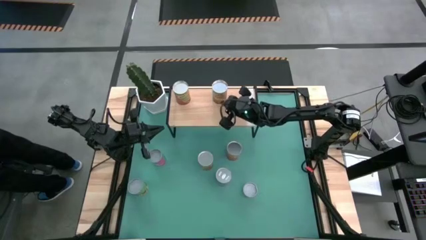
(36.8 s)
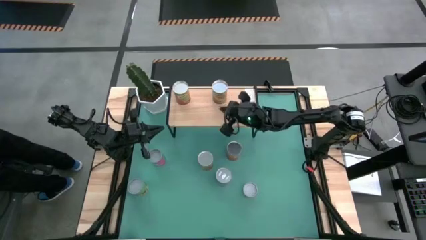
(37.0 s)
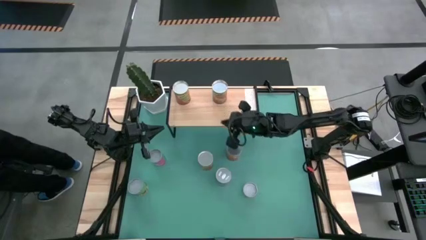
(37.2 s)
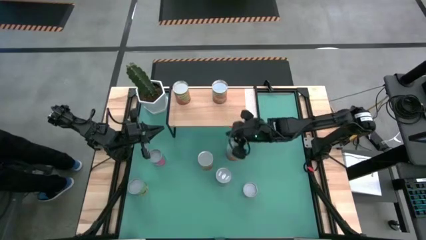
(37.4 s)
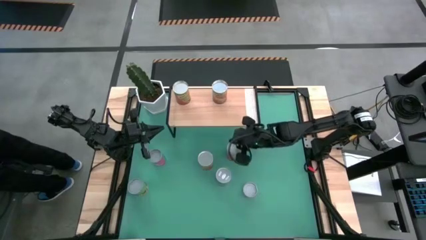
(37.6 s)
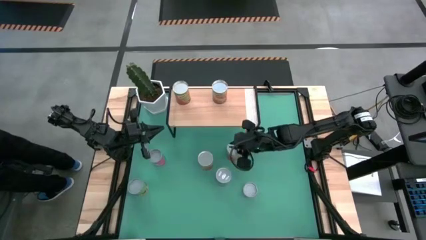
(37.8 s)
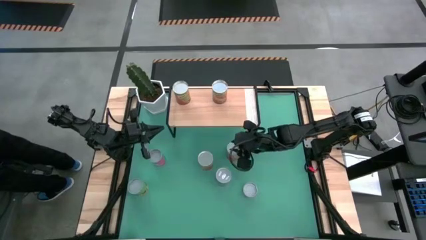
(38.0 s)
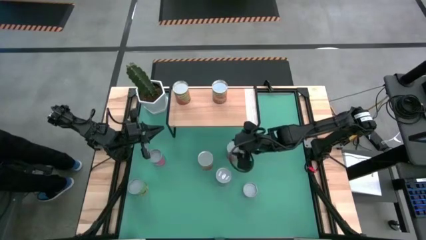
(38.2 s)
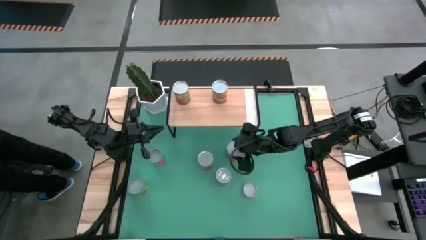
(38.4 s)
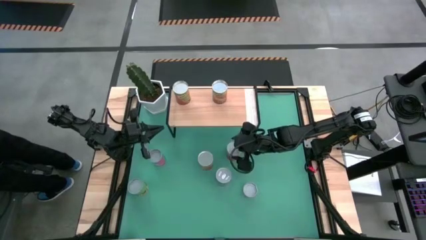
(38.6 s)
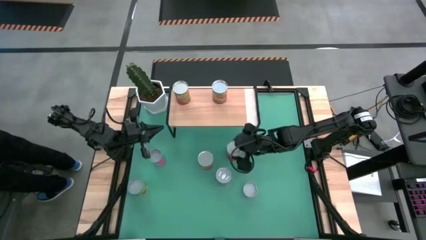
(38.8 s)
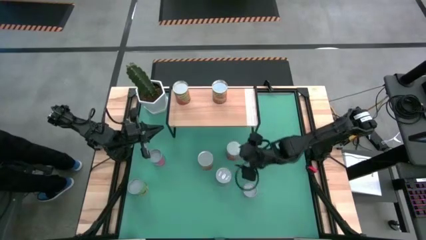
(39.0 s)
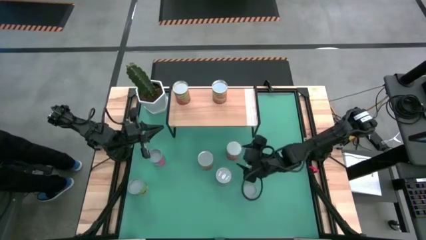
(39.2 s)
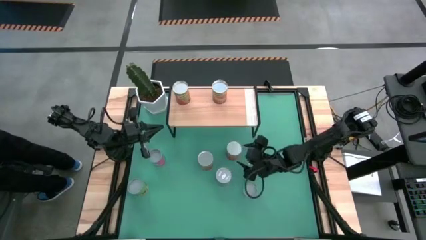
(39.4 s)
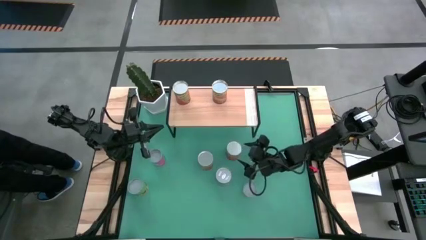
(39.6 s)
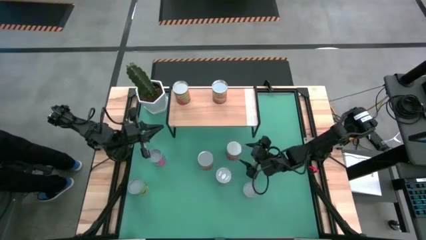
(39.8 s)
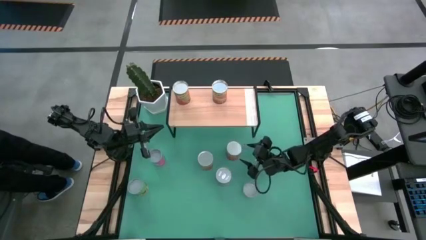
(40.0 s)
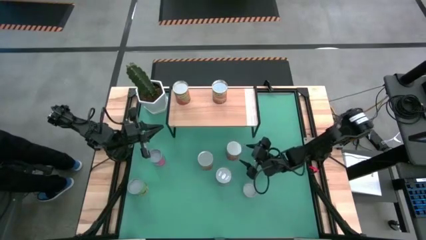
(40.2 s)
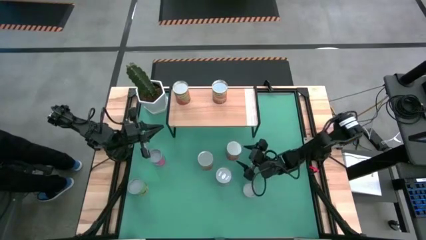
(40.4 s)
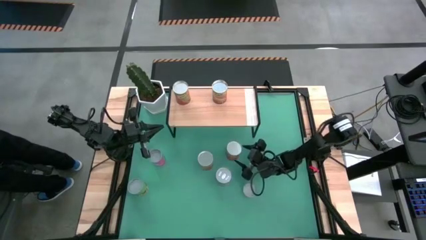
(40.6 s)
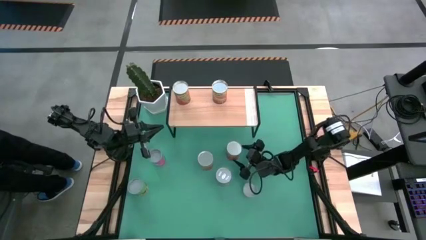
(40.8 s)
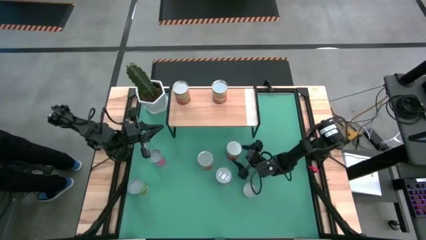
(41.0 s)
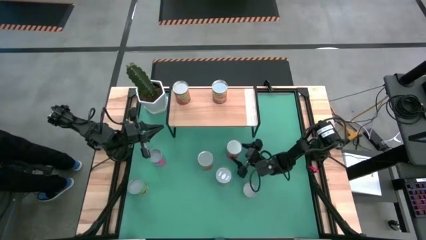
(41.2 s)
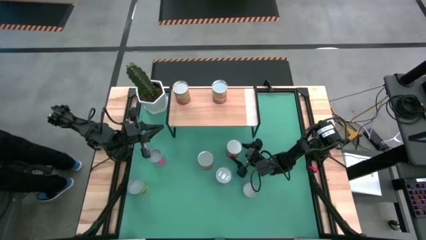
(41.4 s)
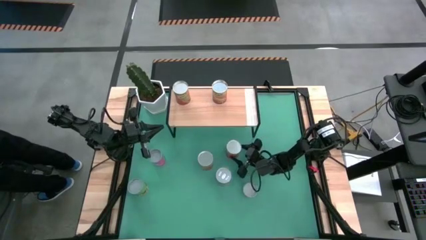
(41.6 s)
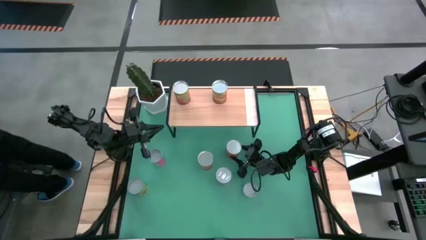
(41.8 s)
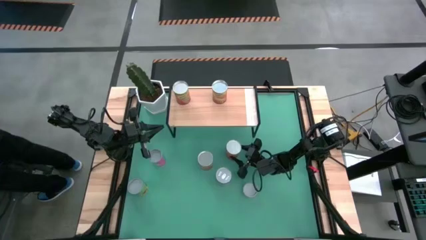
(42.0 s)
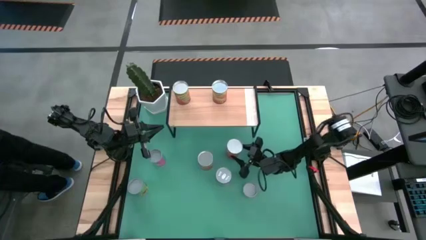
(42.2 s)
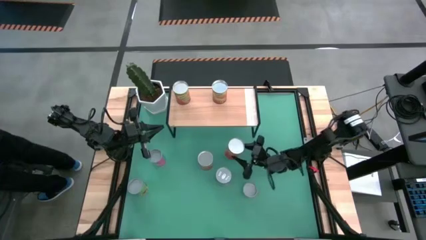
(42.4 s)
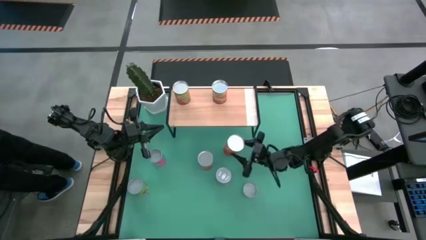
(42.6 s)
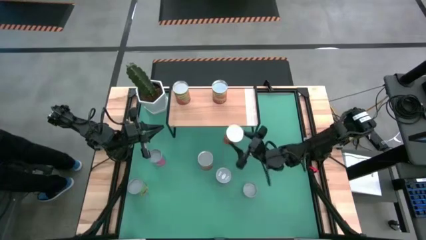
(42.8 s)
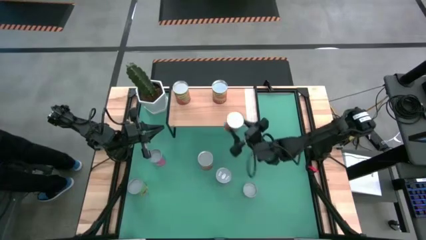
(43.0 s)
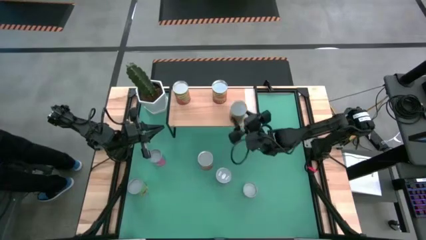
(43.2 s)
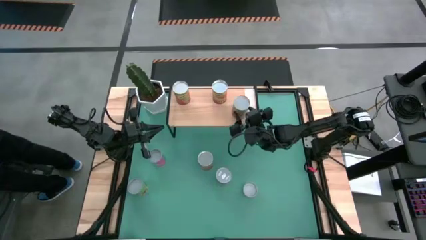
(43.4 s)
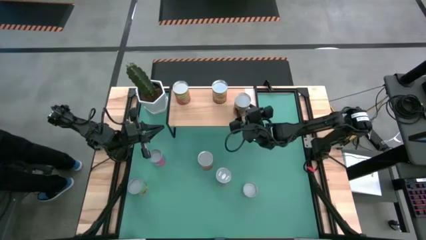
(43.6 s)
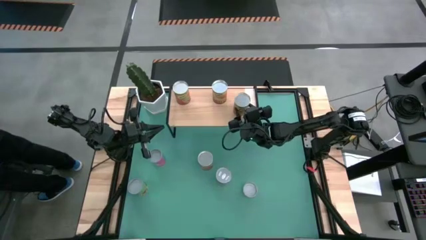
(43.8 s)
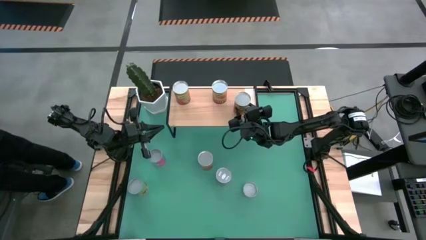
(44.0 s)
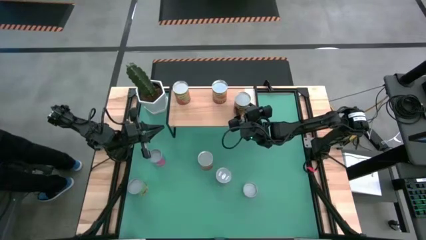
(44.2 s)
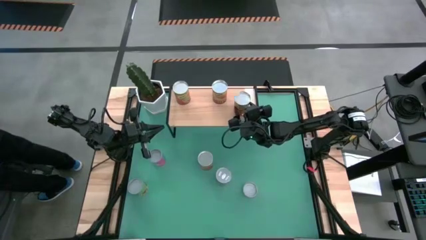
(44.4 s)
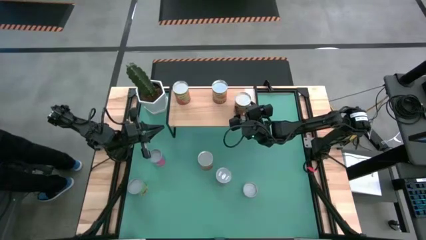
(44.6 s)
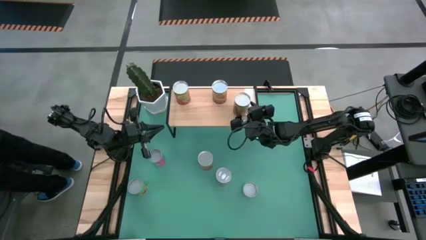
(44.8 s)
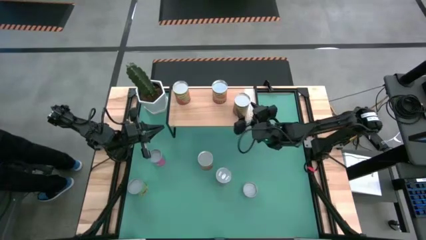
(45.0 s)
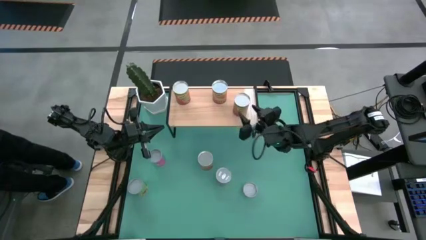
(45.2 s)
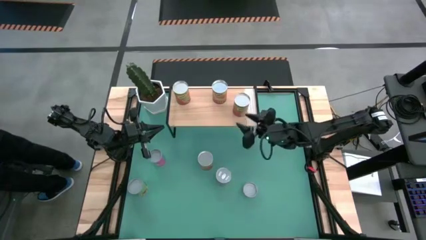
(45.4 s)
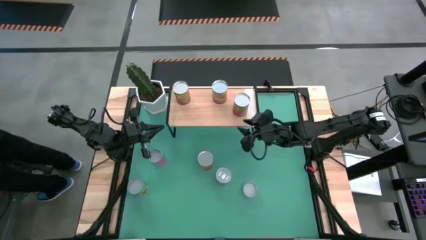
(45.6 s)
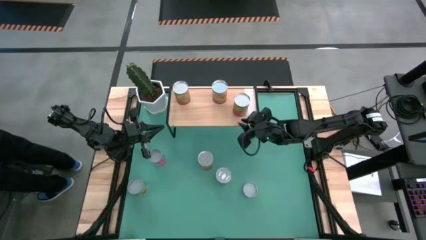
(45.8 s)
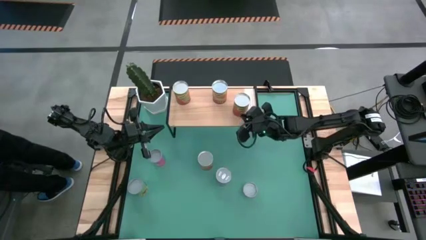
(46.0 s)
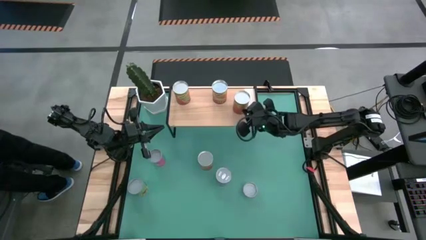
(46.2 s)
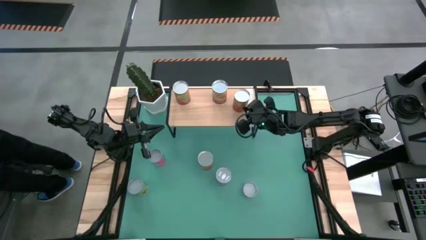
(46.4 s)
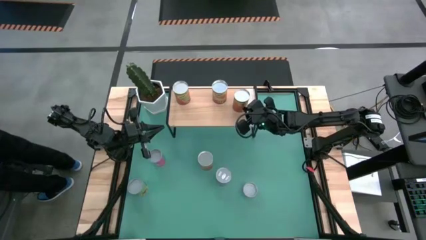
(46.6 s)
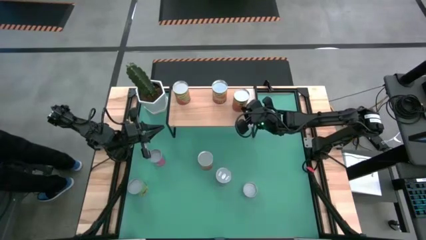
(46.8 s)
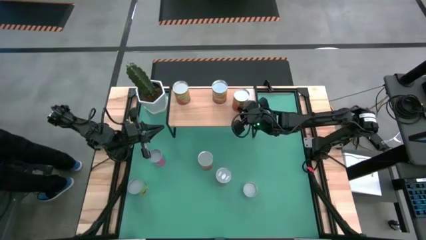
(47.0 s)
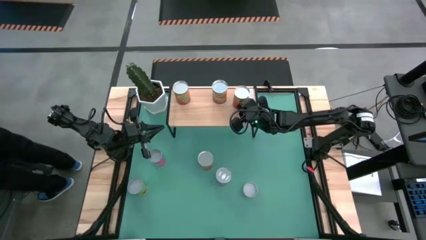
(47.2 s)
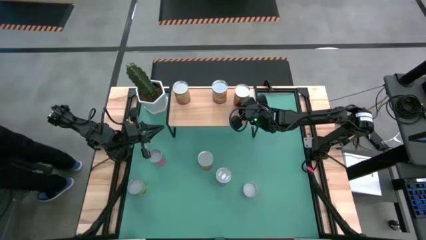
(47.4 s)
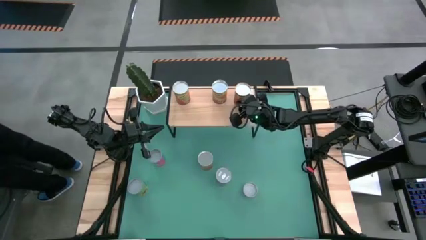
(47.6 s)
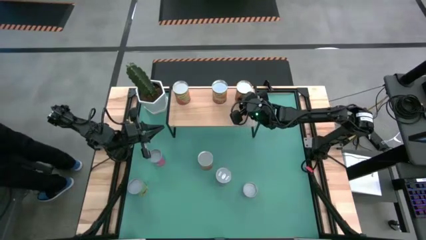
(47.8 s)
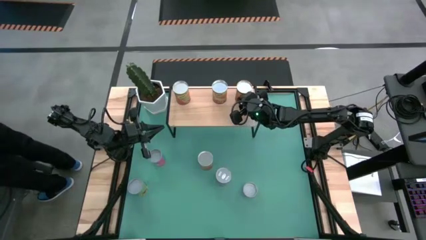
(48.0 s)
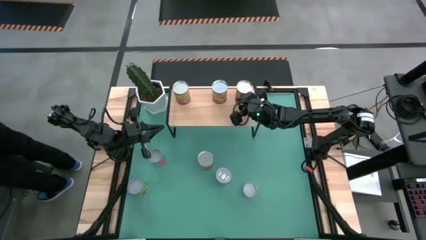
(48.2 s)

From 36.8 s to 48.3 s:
Task: Pick and place cans onto a shelf
Put the canned pineapple on the shelf

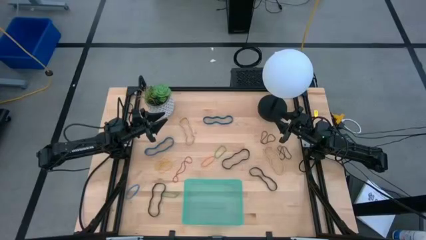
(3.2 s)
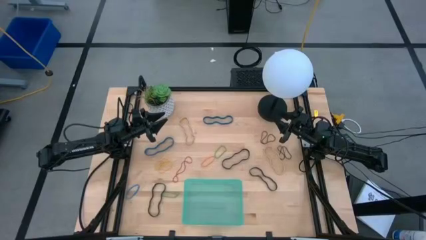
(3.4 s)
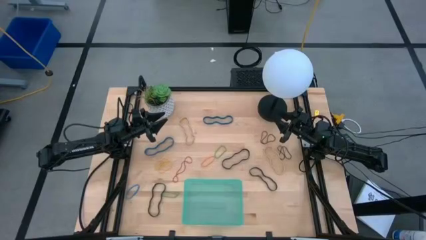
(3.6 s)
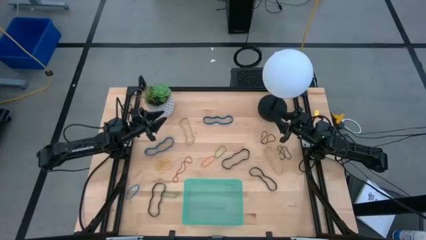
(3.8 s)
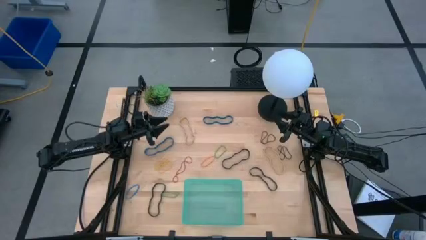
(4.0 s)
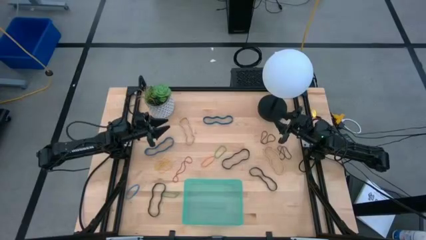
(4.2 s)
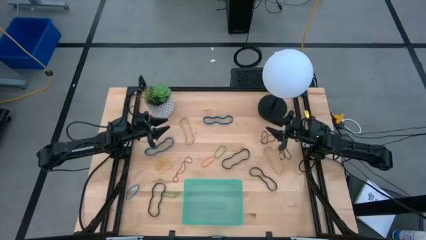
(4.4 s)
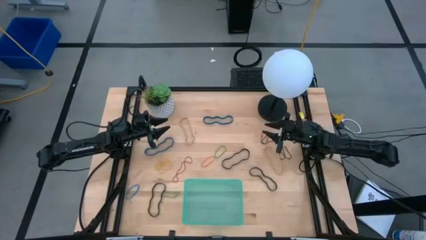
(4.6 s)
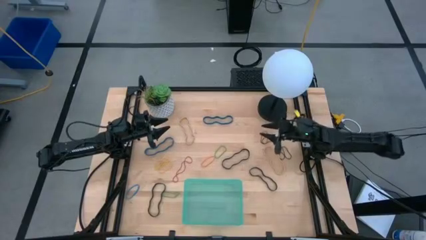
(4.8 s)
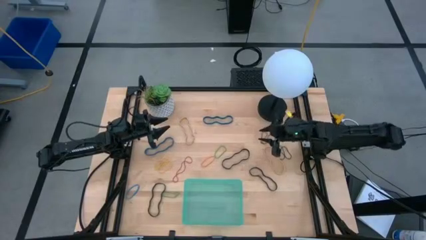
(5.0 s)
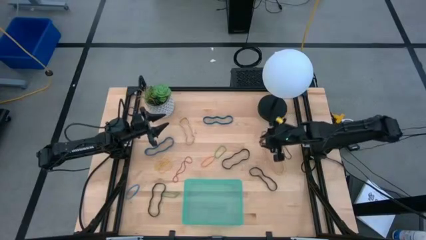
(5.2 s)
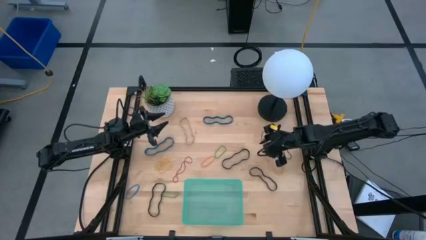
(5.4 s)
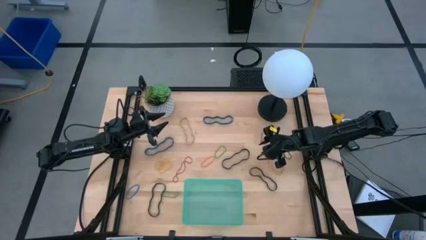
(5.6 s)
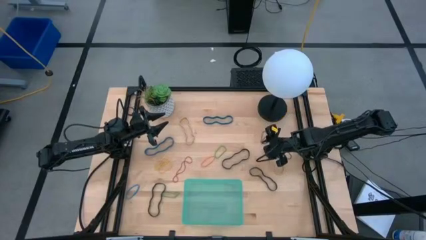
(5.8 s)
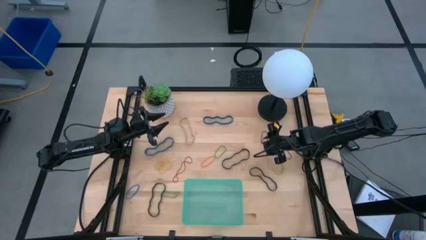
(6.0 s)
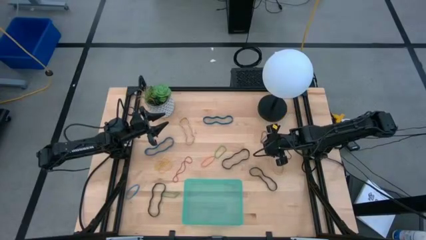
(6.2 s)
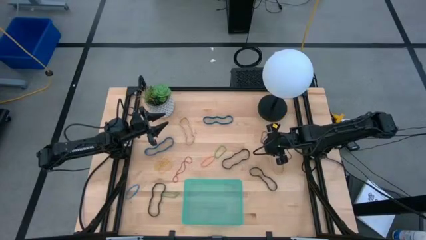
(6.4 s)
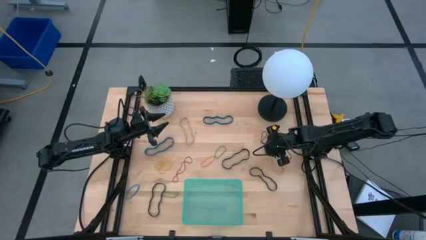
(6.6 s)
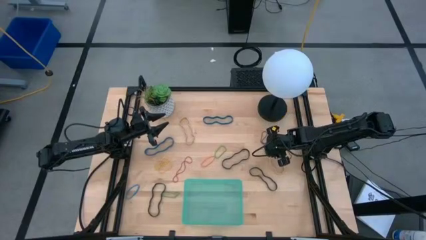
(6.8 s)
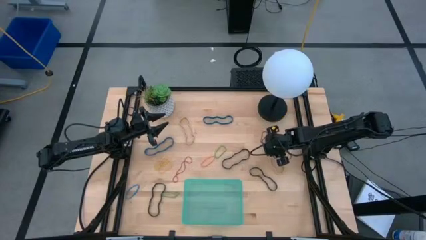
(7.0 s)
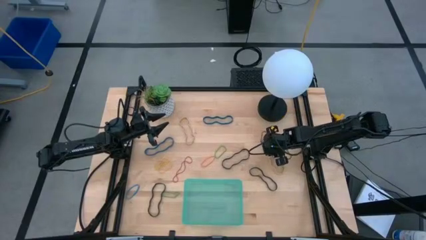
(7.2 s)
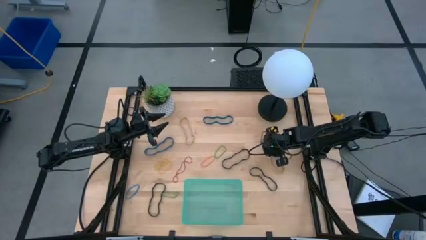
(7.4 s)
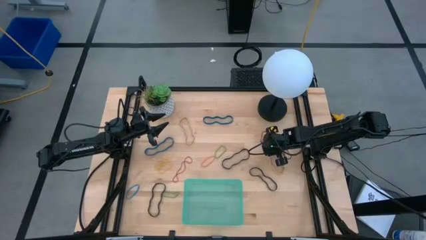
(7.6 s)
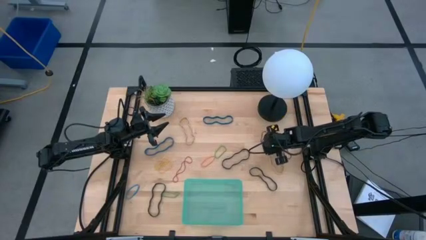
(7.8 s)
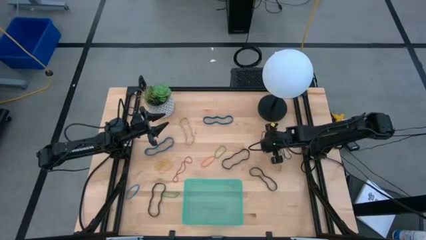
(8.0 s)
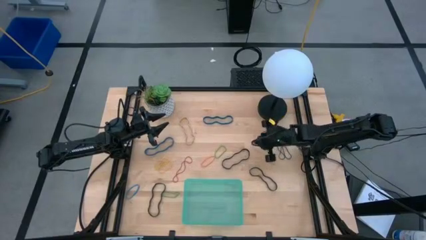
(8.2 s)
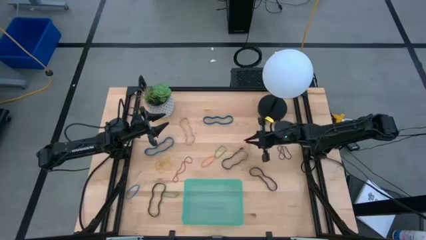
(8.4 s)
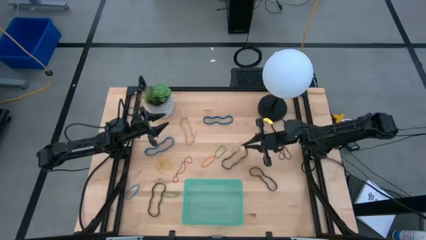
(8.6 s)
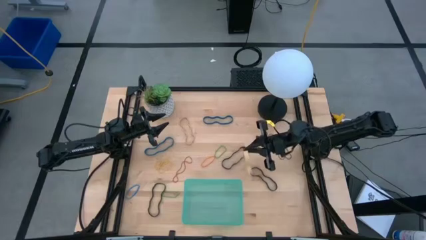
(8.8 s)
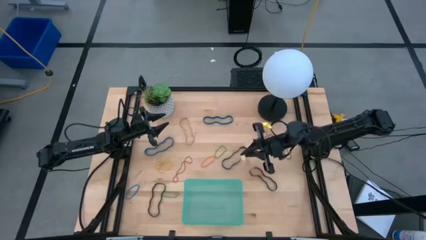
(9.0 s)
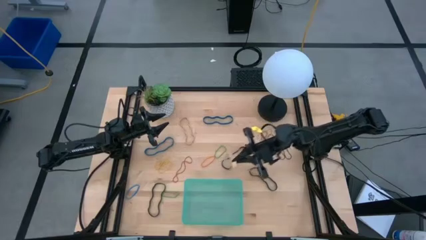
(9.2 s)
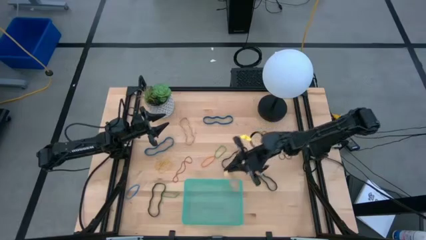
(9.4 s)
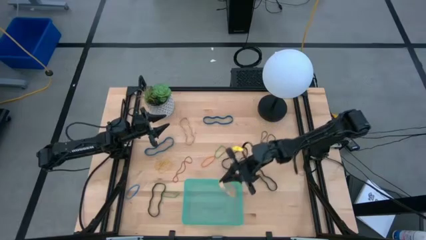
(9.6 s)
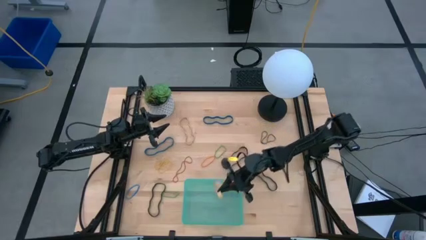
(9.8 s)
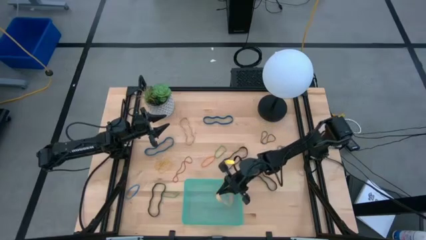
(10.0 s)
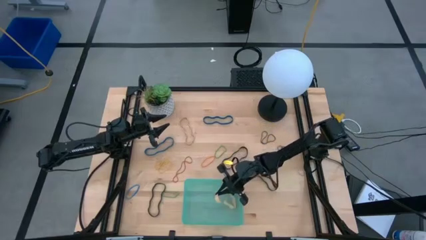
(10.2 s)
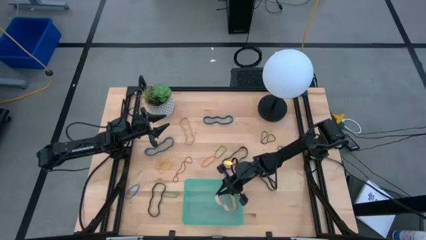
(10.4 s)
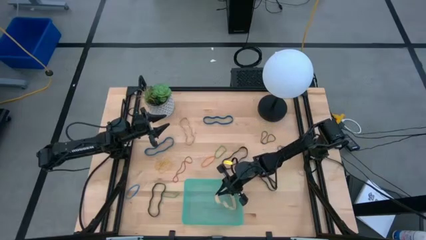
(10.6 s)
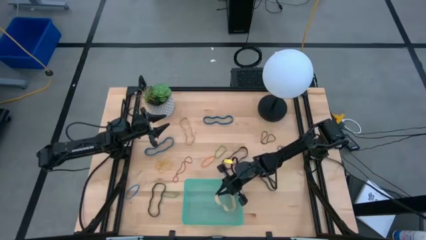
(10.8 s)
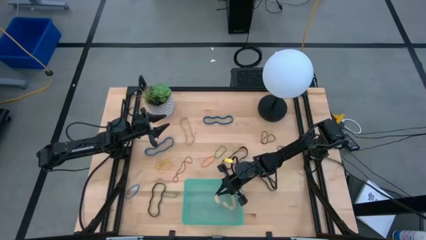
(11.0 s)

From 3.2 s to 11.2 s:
Task: Pick and place rubber bands into bin
Put the right large brown rubberband into the green bin
